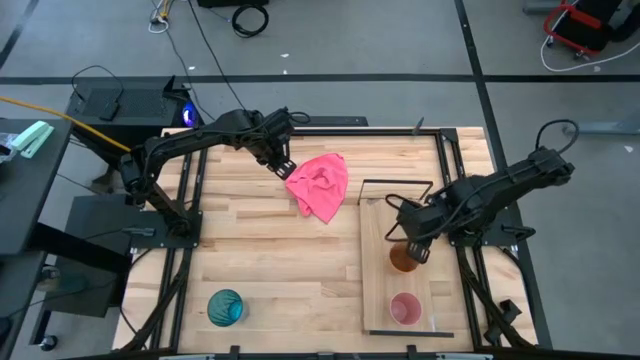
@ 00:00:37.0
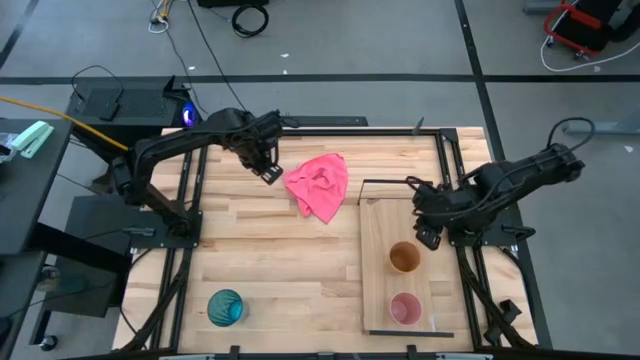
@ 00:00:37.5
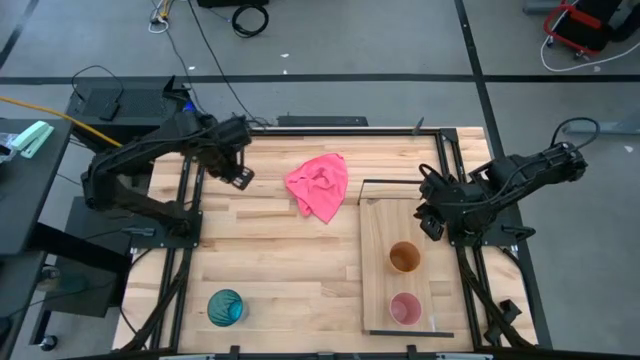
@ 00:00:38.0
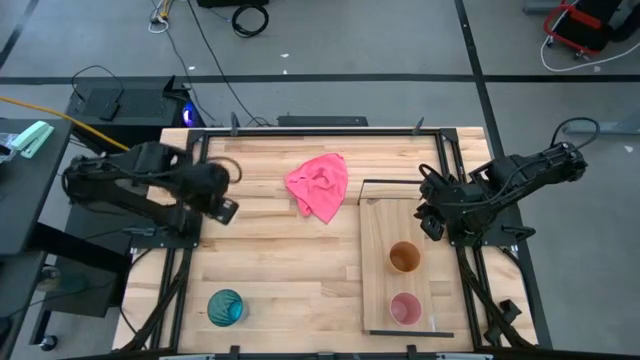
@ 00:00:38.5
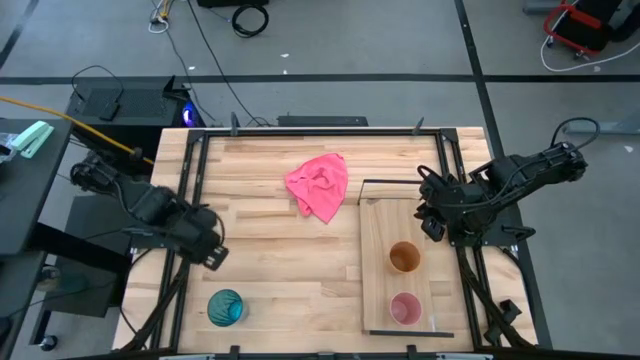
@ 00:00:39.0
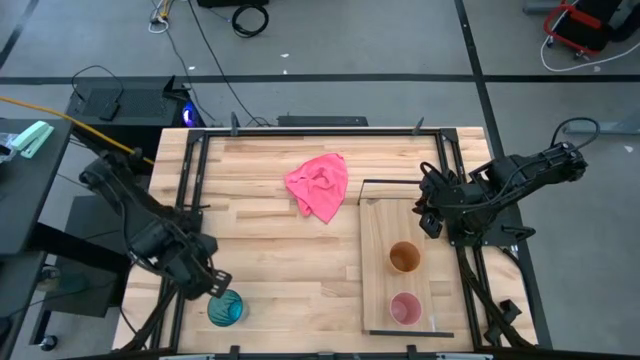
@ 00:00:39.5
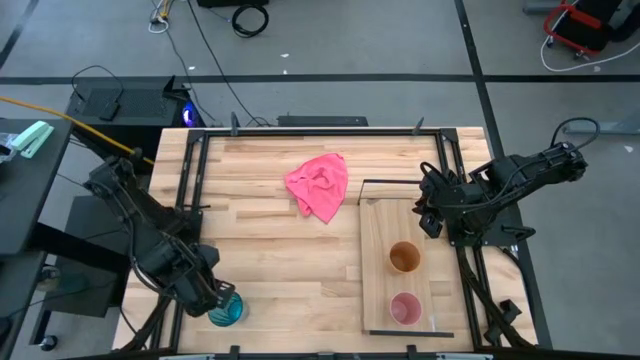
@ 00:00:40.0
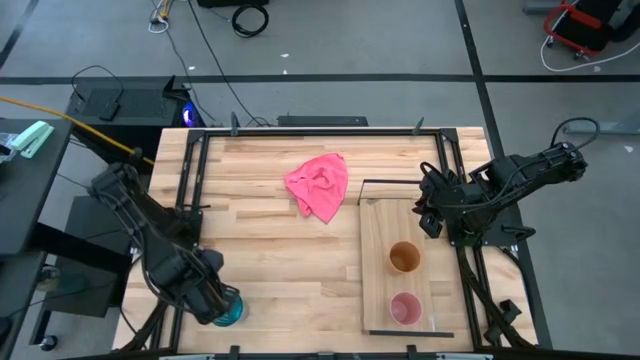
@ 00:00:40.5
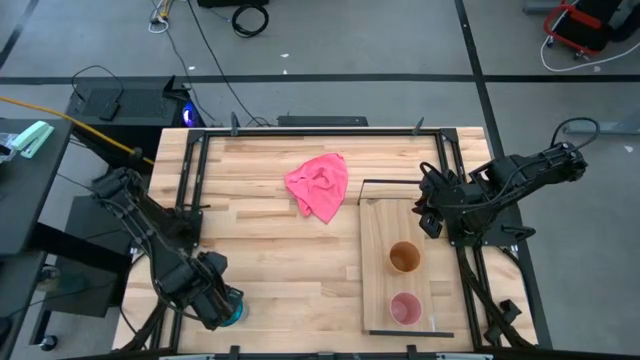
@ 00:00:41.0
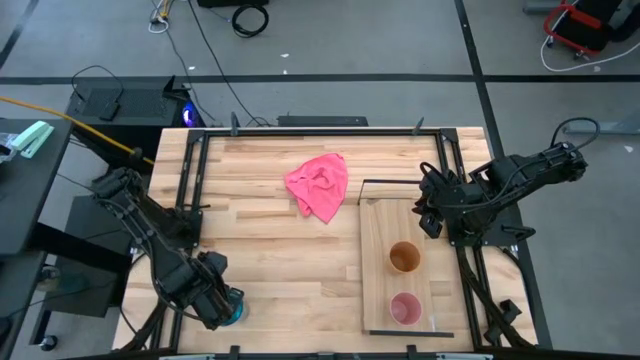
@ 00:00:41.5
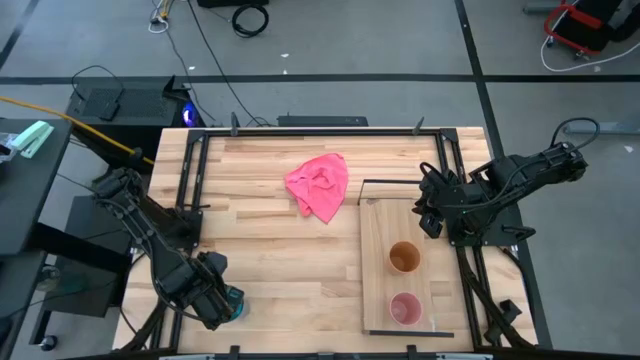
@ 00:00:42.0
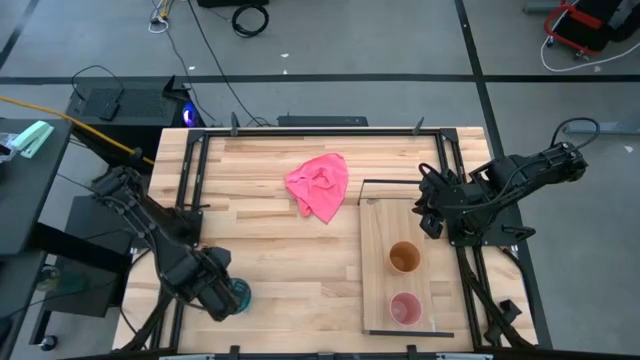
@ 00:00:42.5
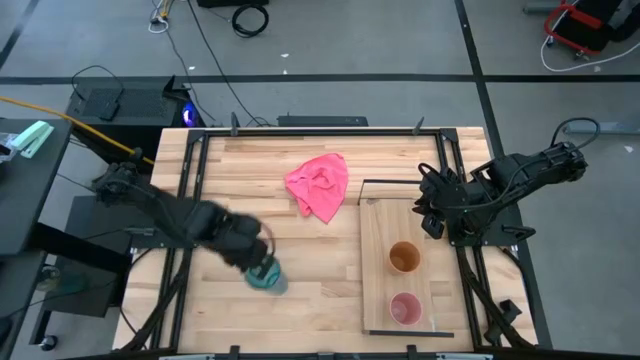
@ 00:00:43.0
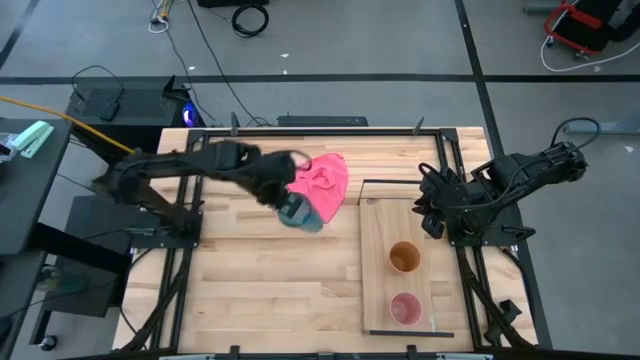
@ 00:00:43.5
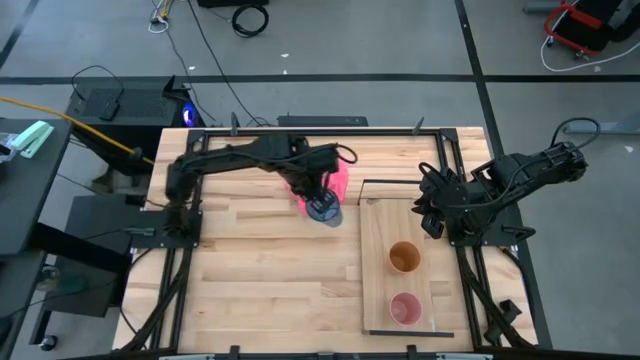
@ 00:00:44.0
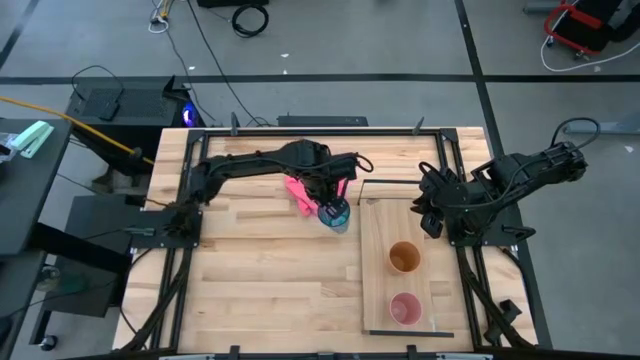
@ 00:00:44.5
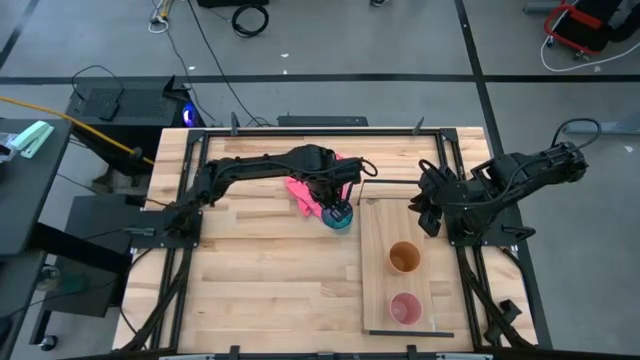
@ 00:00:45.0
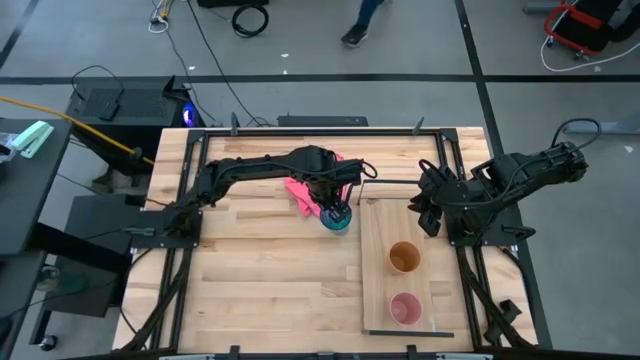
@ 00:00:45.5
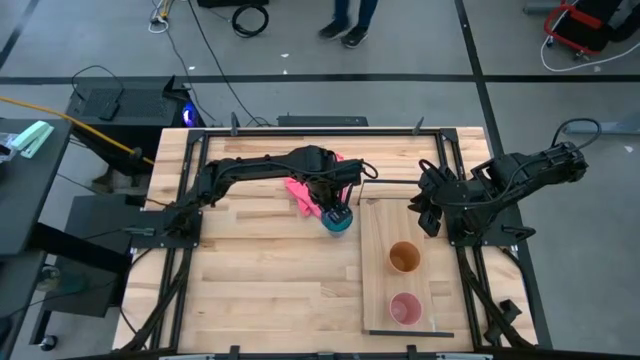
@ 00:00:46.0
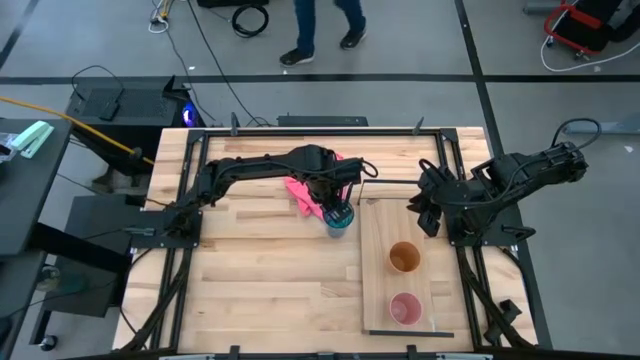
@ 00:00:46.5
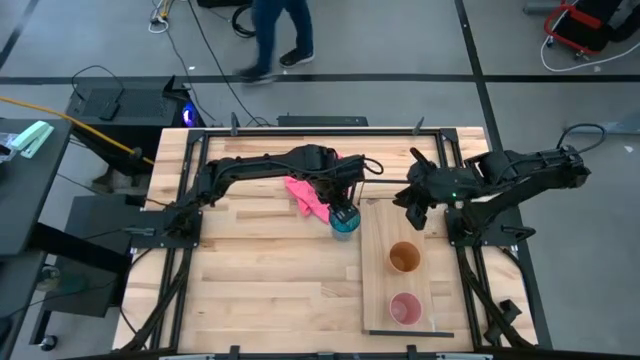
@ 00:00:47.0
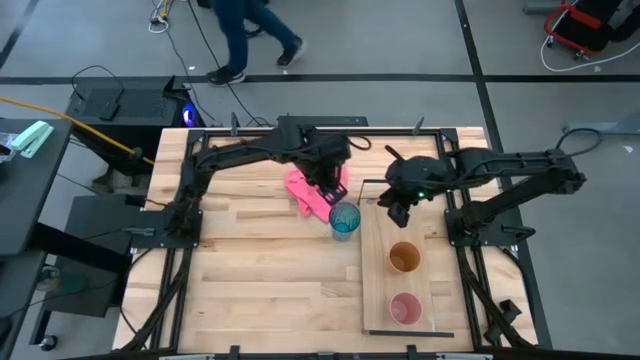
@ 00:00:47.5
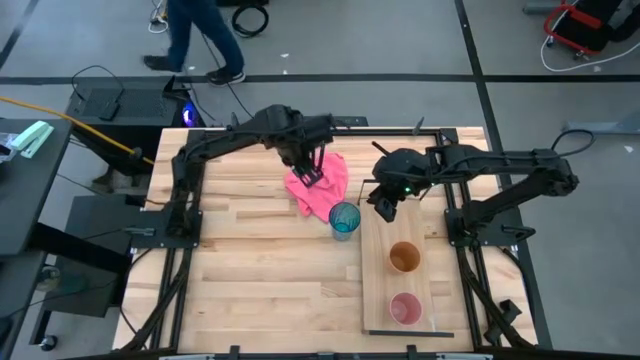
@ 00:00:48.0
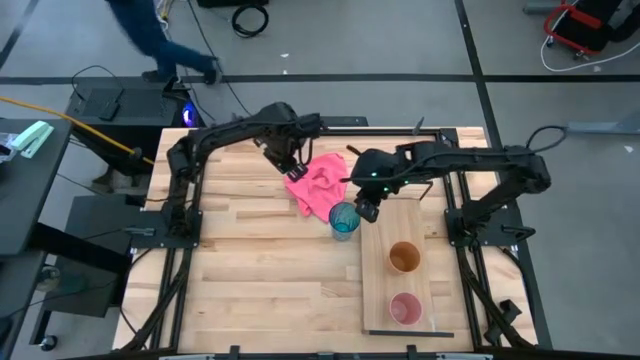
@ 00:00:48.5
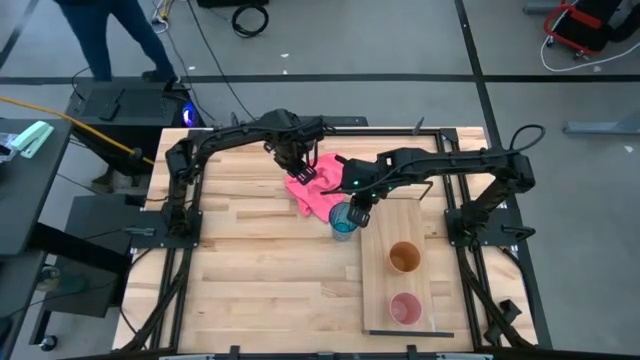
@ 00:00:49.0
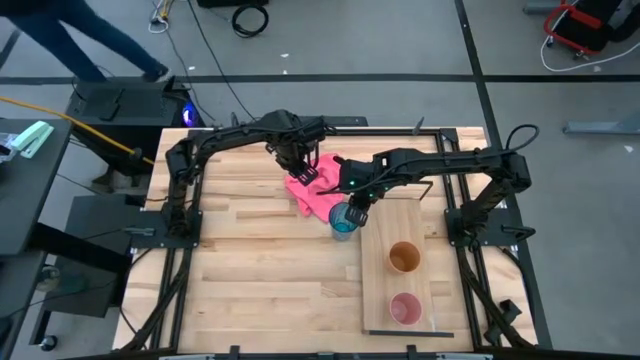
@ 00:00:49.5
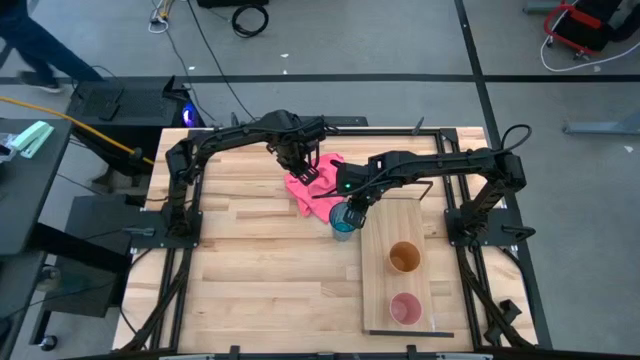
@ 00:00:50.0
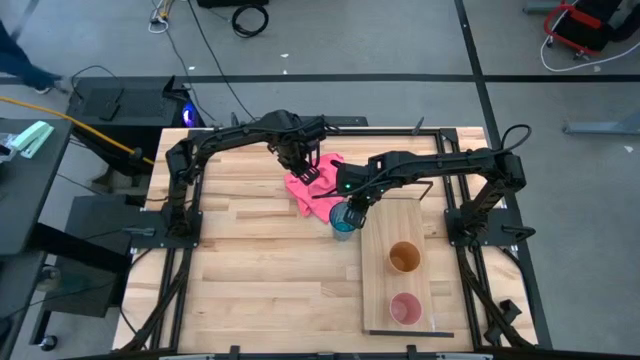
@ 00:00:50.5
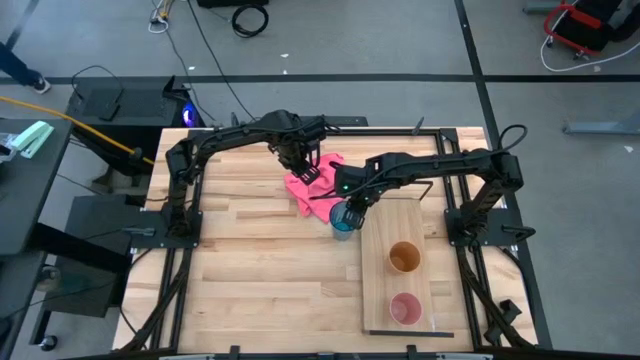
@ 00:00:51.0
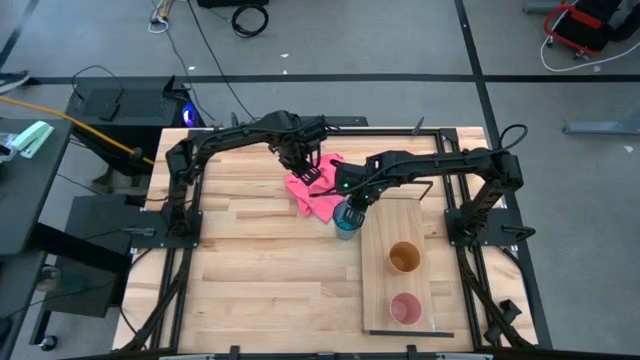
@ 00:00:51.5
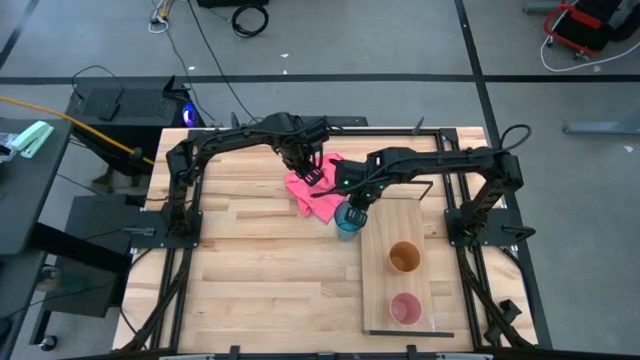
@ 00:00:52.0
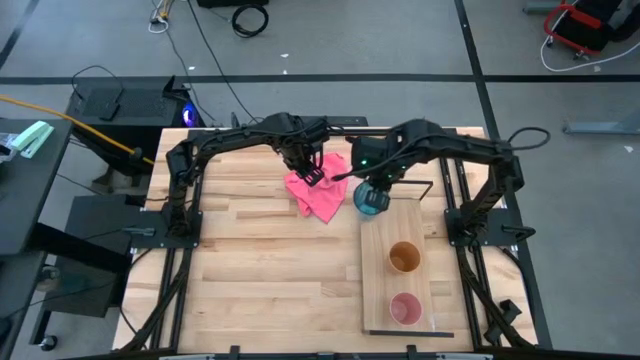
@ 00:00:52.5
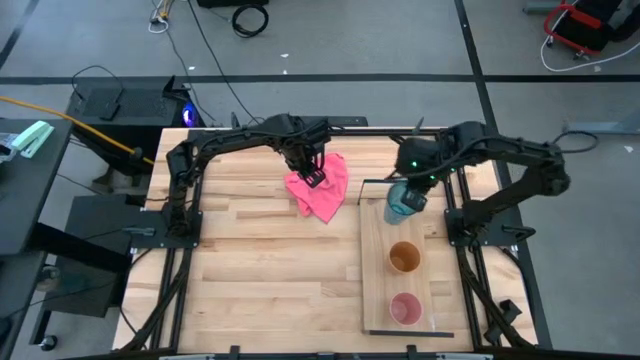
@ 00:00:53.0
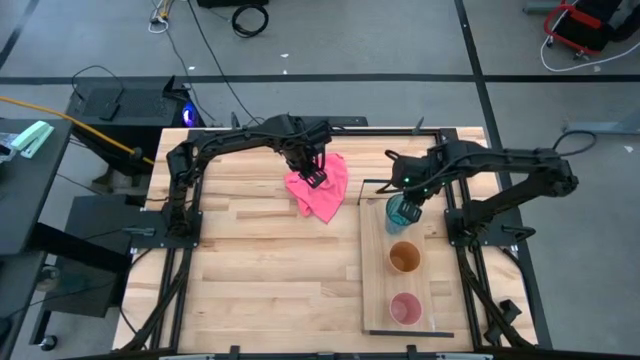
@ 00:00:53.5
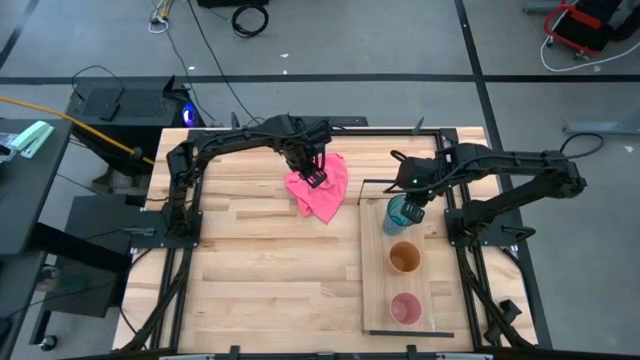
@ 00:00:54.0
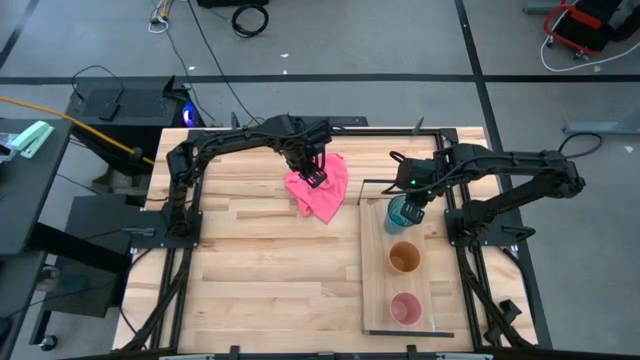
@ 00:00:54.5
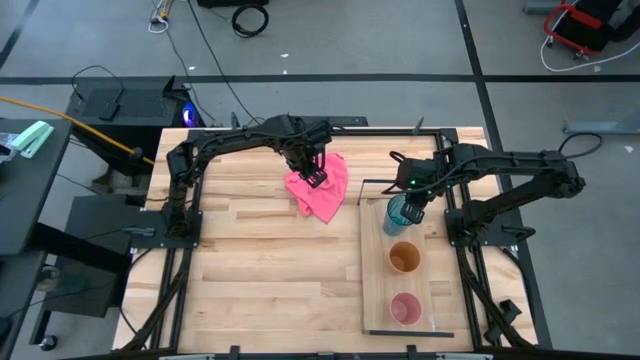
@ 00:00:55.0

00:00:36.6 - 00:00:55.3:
Task: Stack small to large cups/mugs on shelf
Put the blue cup on the shelf

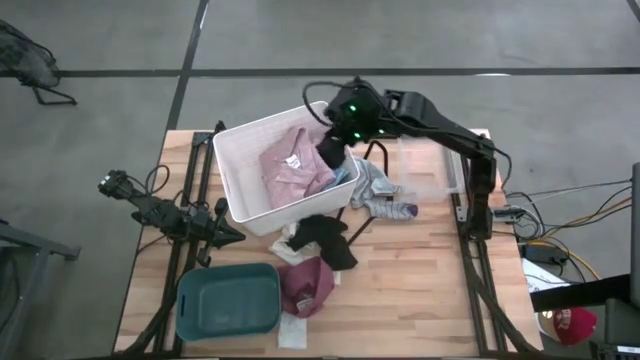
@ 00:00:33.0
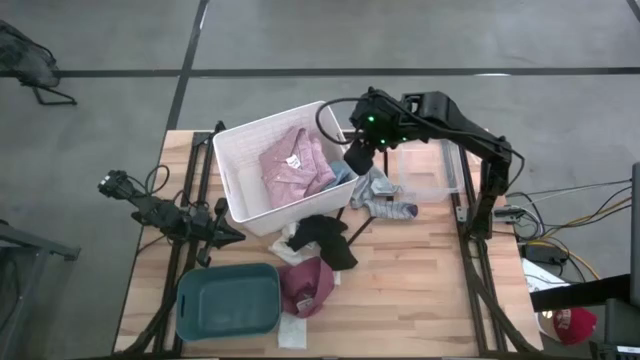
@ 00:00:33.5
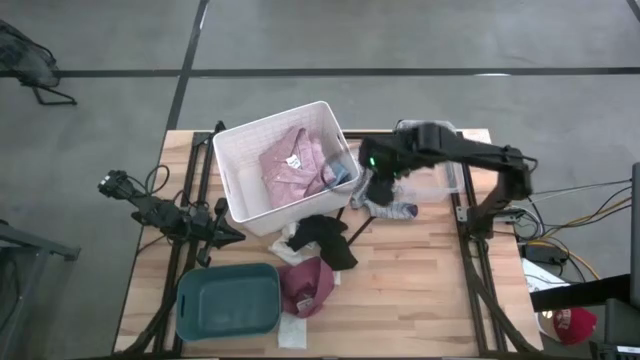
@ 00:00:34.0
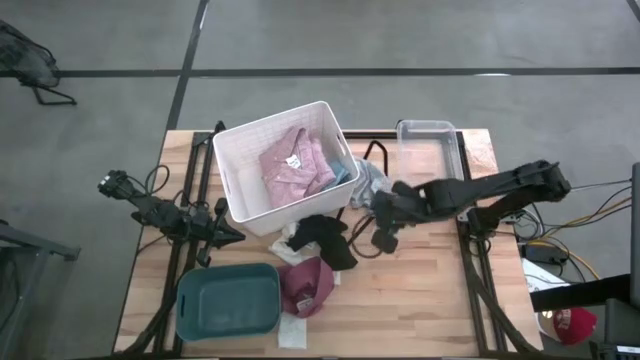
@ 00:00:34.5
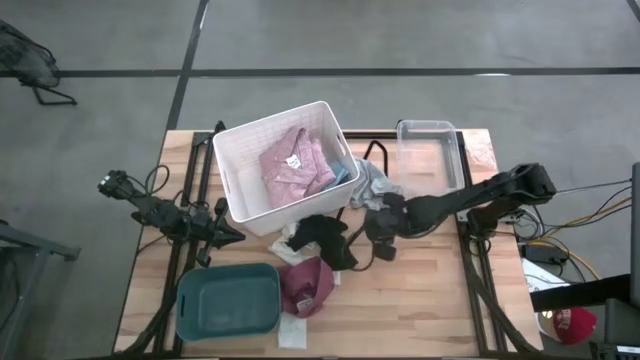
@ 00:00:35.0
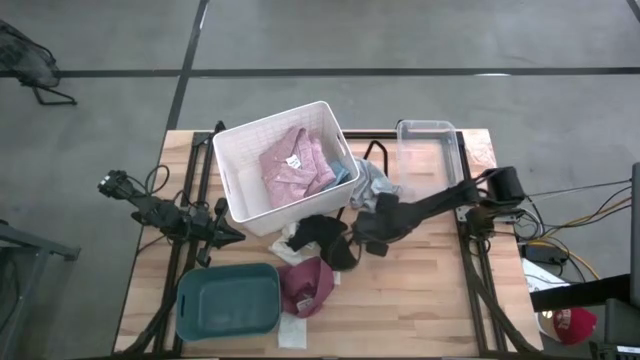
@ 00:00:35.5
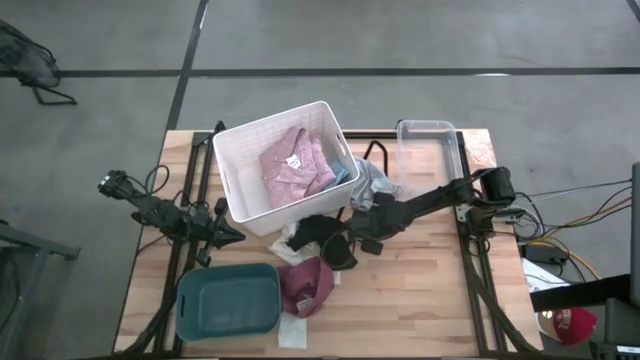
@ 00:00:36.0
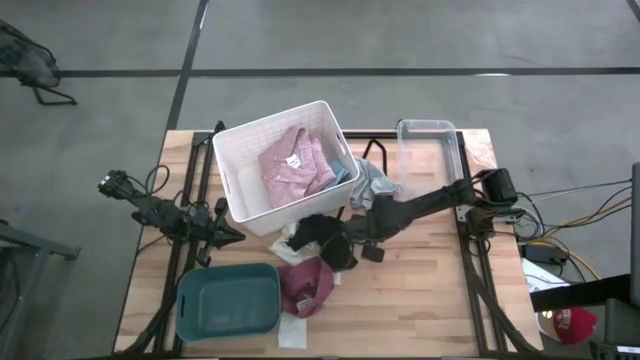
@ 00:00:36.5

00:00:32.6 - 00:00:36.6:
Task: Pick & Place Cloths
Put the striped sock into the transparent bin
